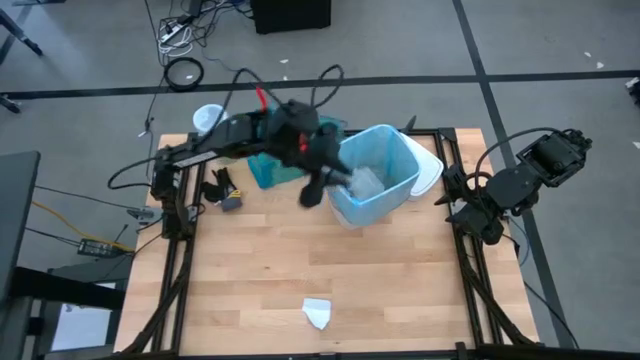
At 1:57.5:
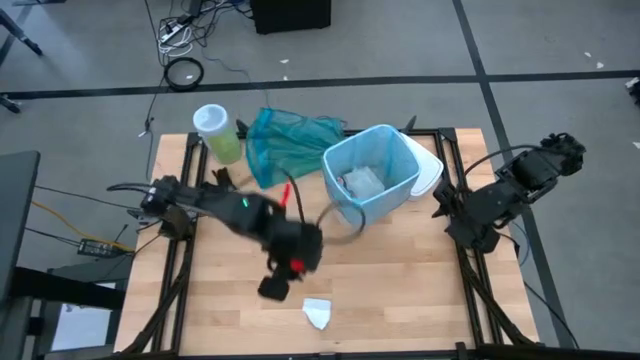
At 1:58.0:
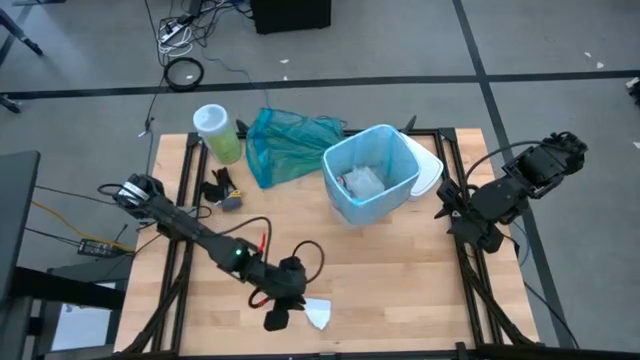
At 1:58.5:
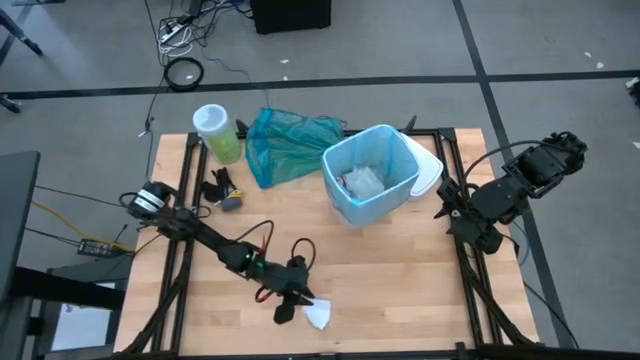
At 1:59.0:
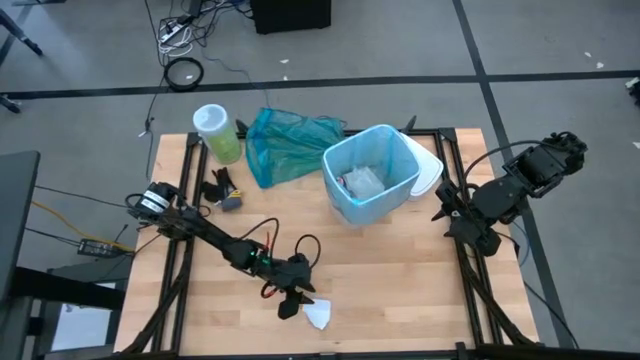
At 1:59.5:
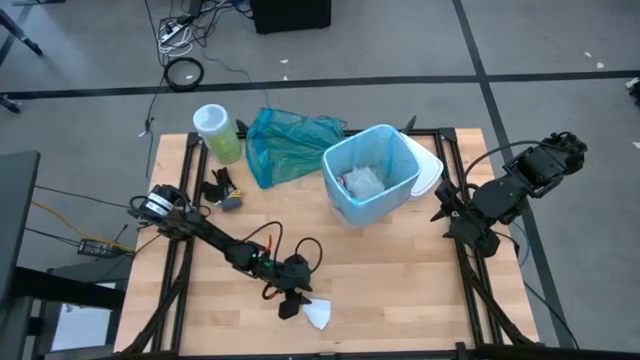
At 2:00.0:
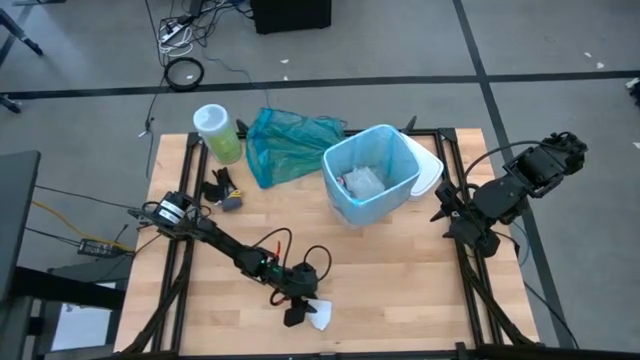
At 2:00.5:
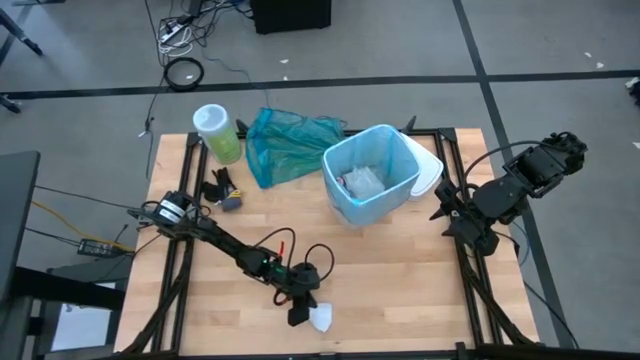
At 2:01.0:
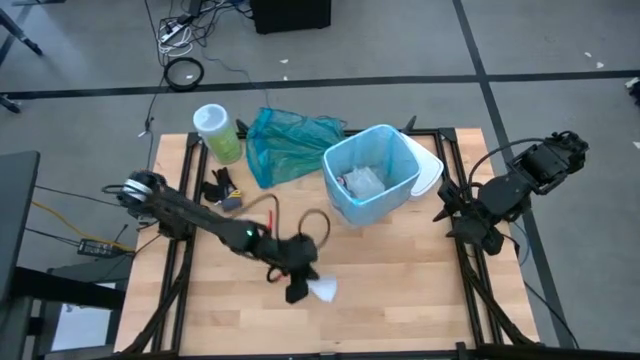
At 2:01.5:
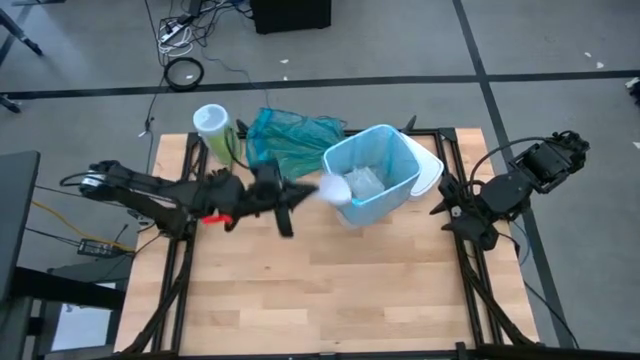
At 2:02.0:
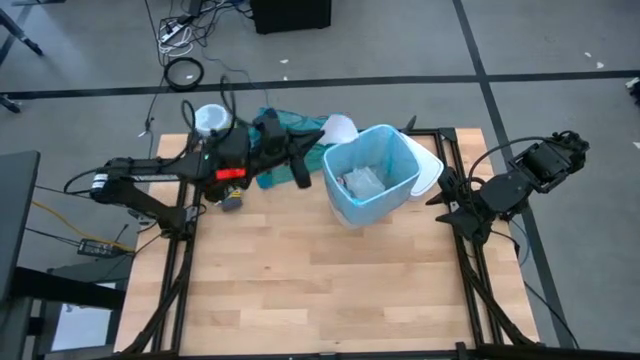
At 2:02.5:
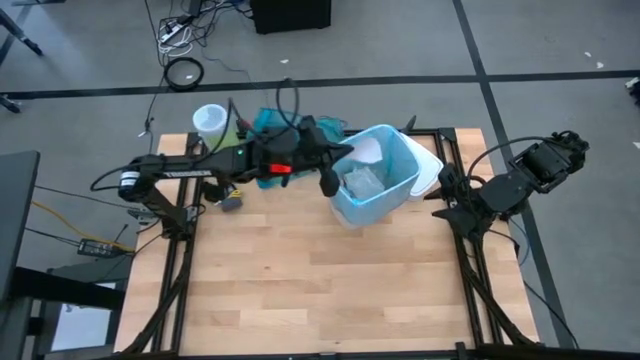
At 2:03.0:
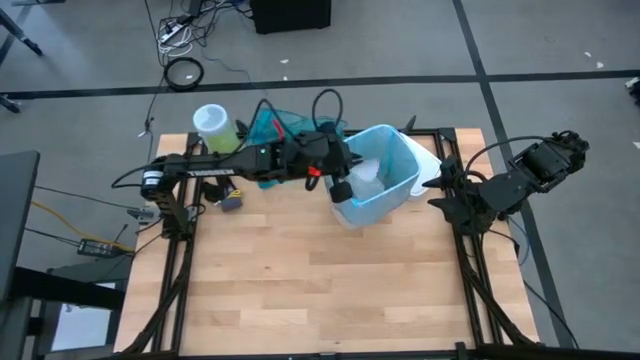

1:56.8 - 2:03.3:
Task: place trash/remove bag and relplace
Put the white paper into the white trash bin

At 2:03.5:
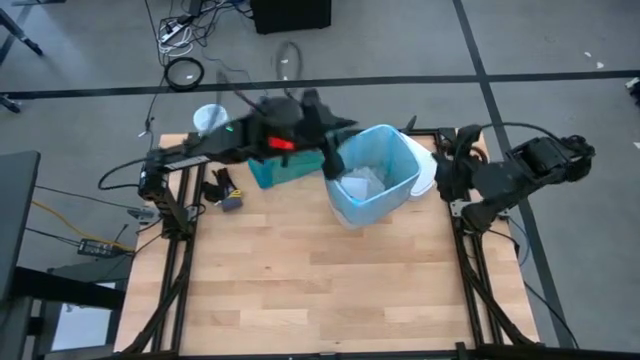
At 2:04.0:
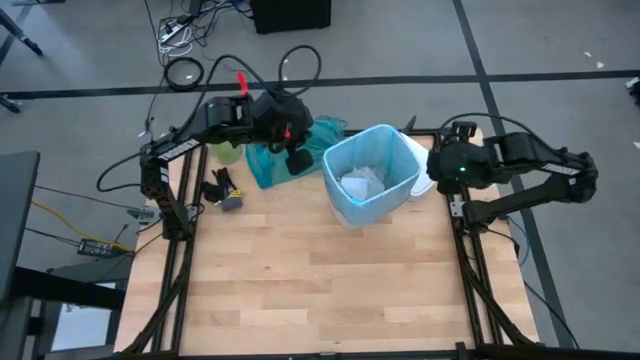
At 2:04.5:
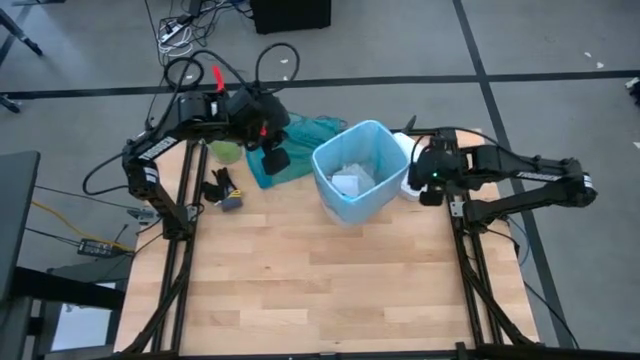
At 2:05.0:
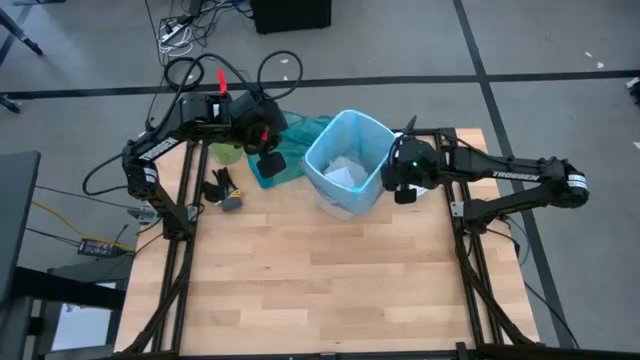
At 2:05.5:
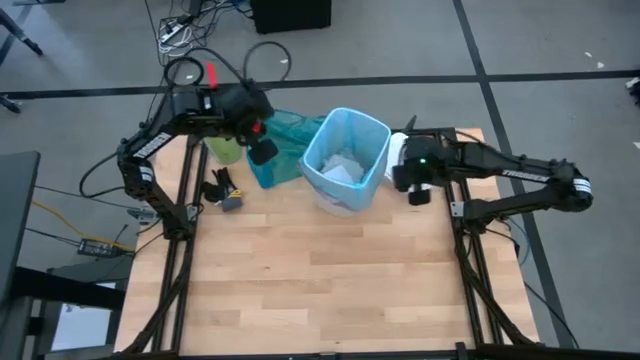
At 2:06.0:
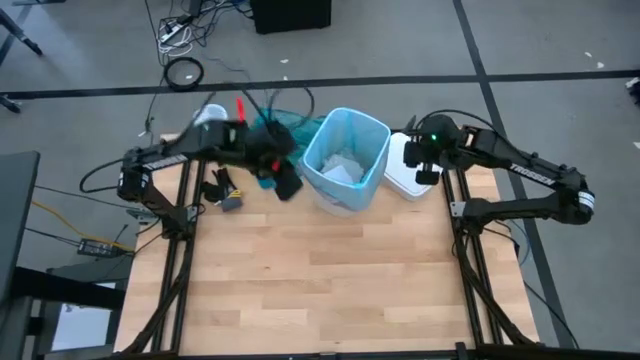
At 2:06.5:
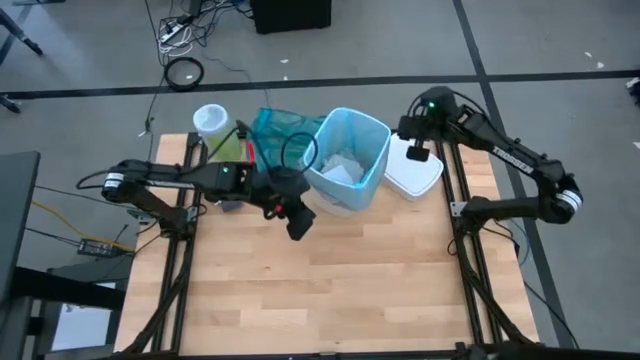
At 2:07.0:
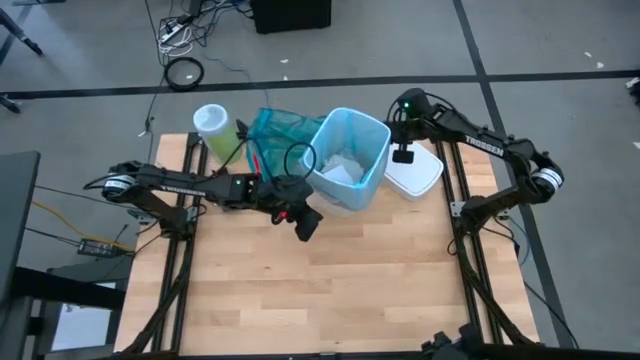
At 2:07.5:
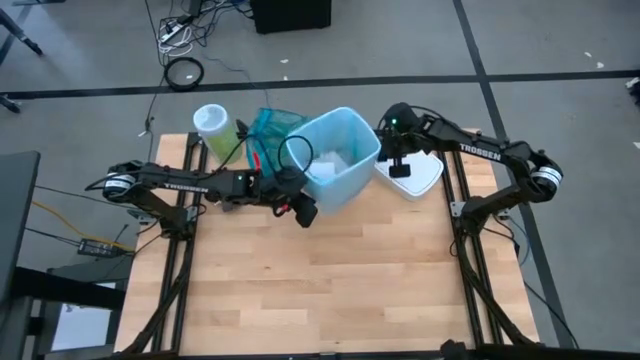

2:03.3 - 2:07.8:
Adjust the white trash bin

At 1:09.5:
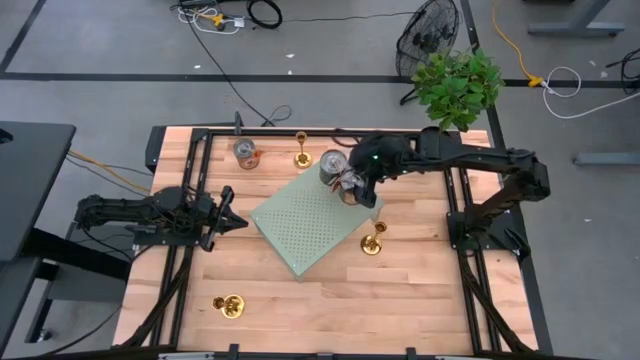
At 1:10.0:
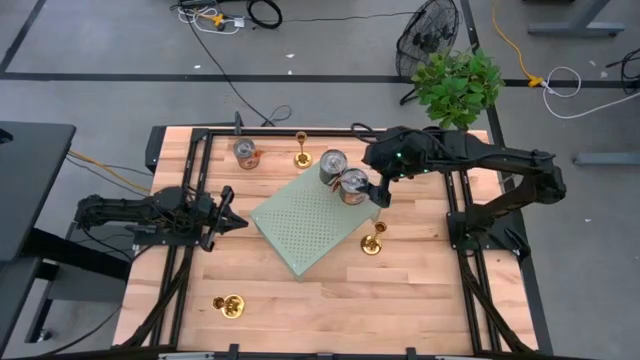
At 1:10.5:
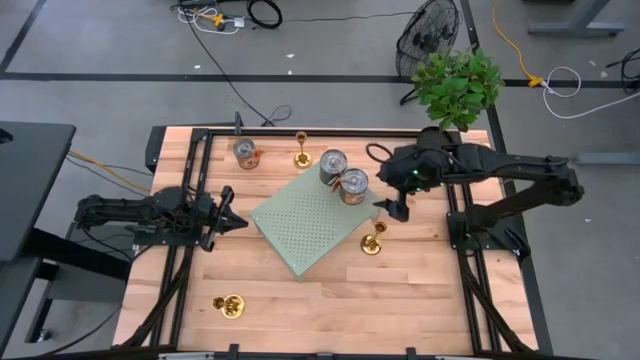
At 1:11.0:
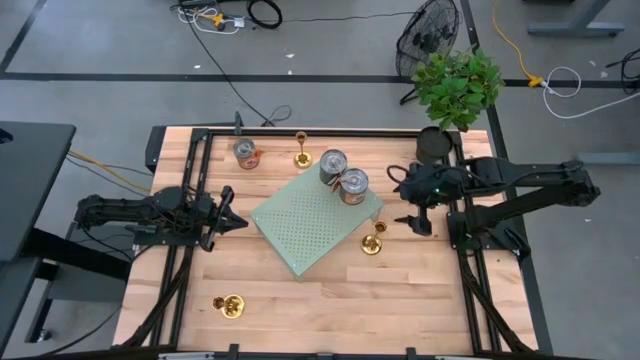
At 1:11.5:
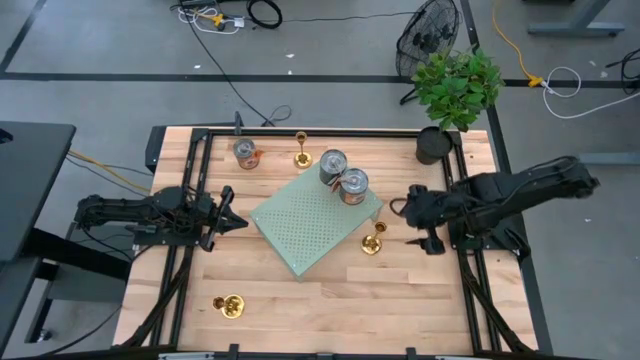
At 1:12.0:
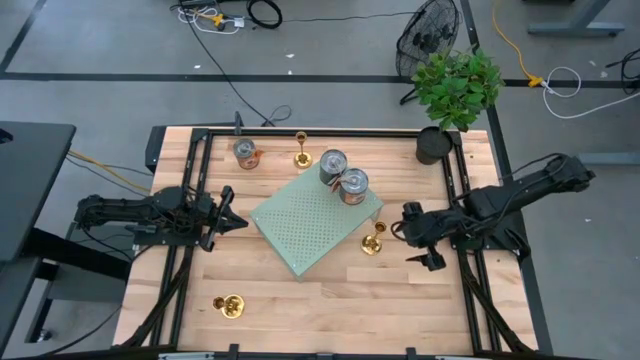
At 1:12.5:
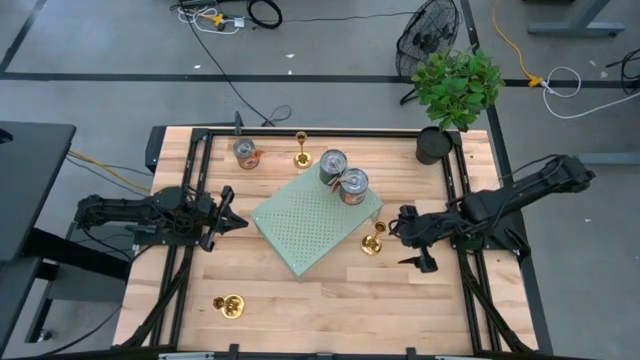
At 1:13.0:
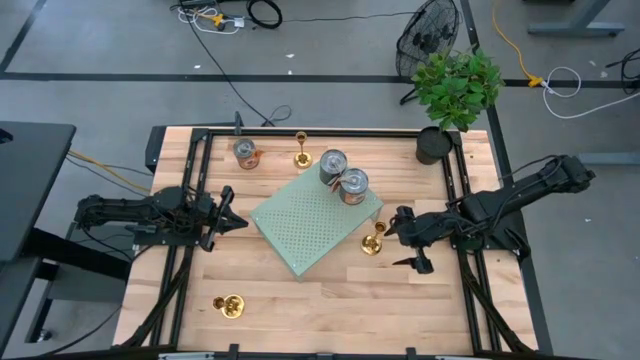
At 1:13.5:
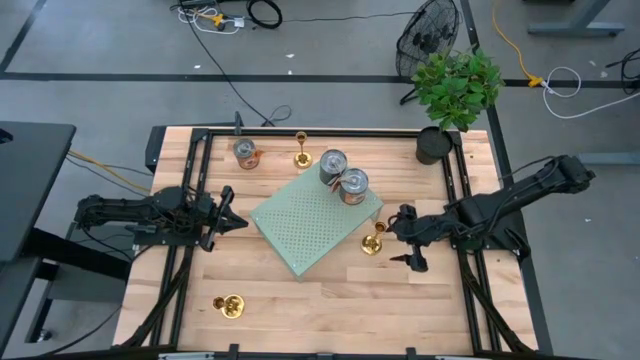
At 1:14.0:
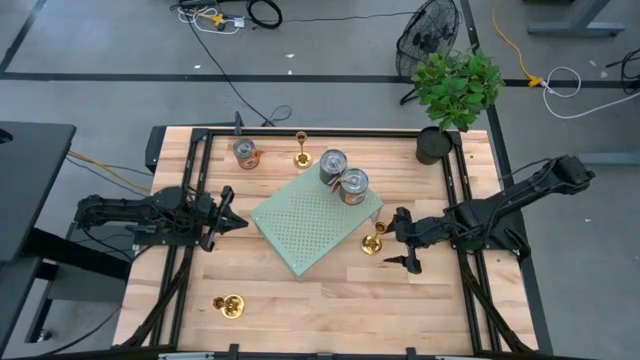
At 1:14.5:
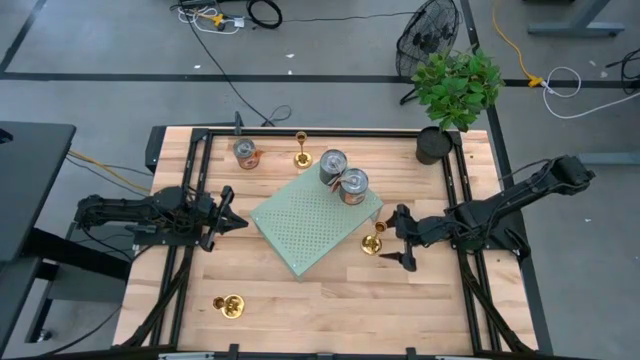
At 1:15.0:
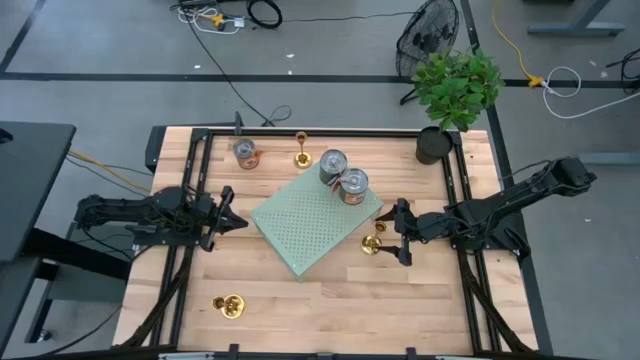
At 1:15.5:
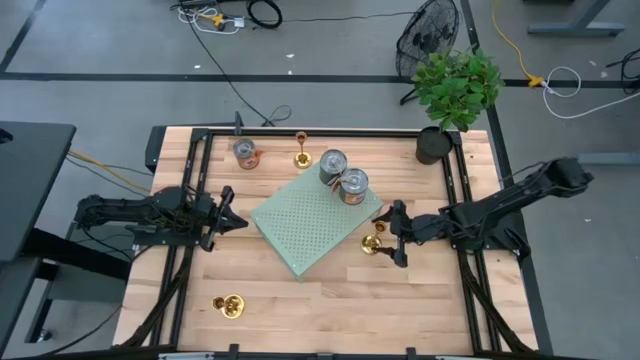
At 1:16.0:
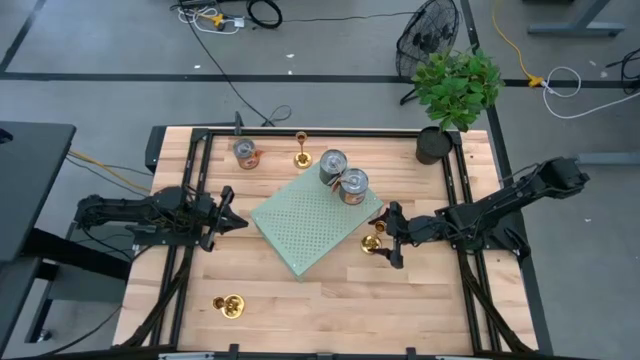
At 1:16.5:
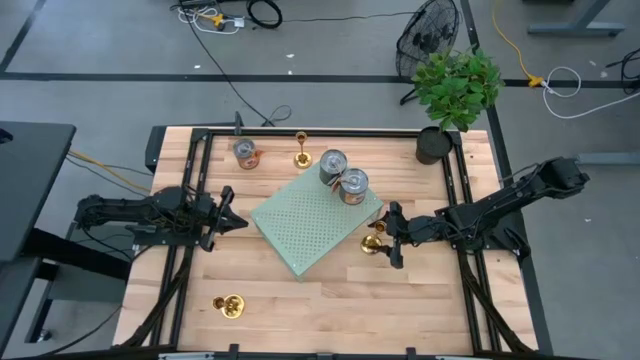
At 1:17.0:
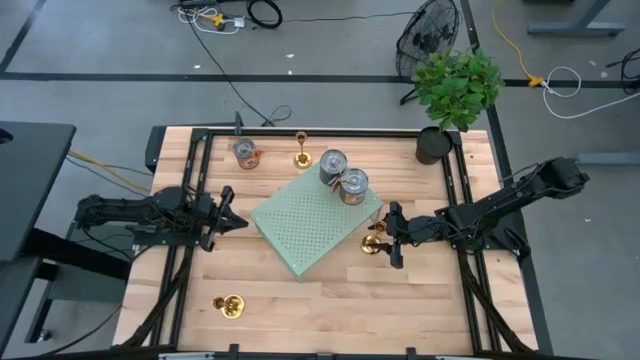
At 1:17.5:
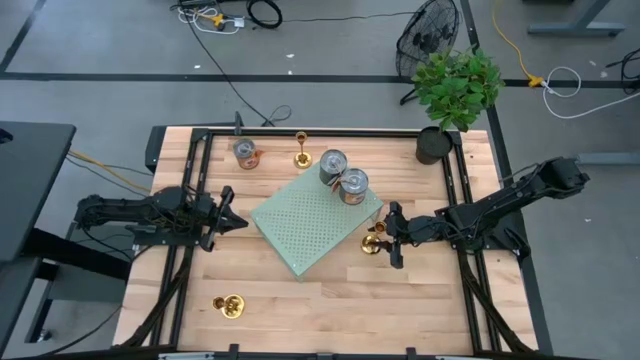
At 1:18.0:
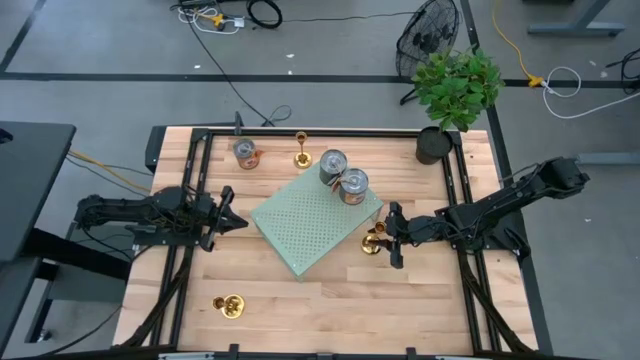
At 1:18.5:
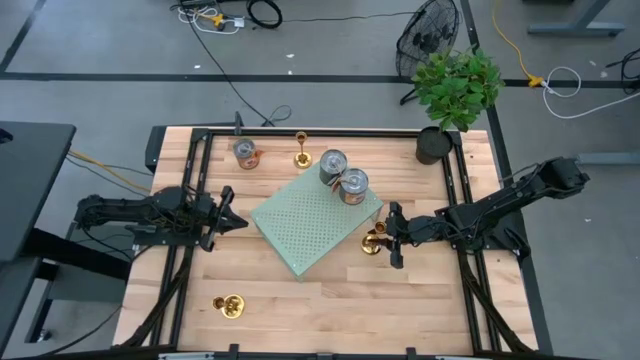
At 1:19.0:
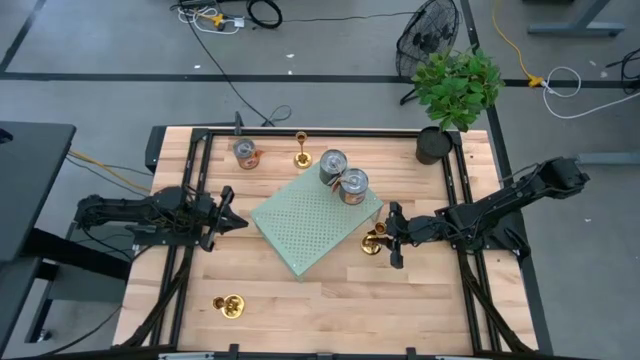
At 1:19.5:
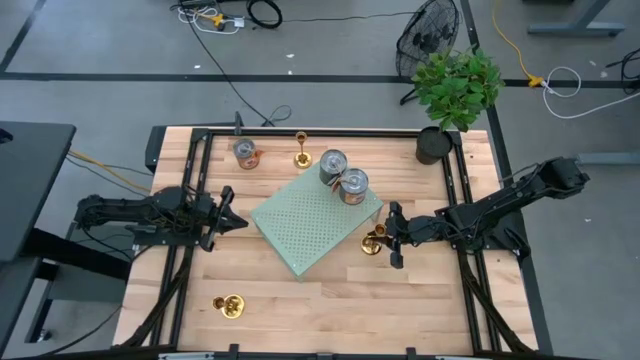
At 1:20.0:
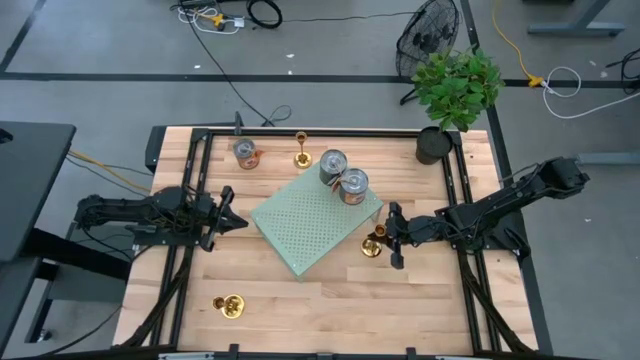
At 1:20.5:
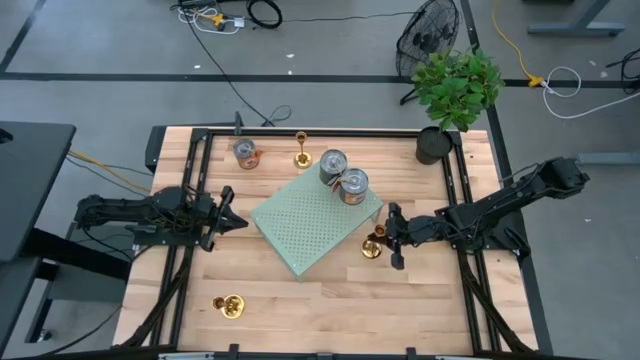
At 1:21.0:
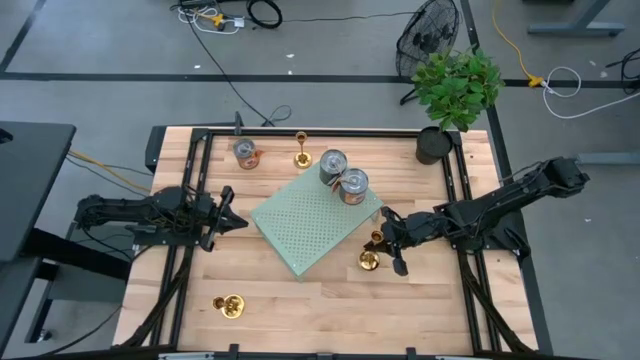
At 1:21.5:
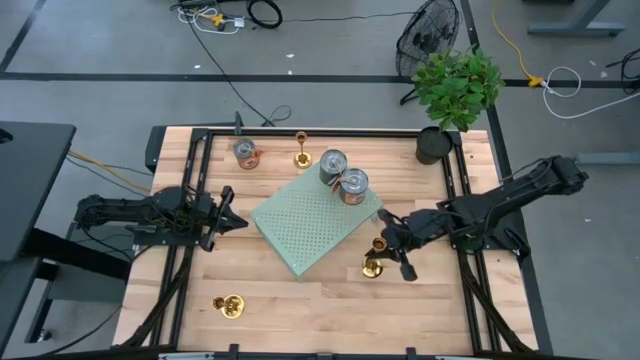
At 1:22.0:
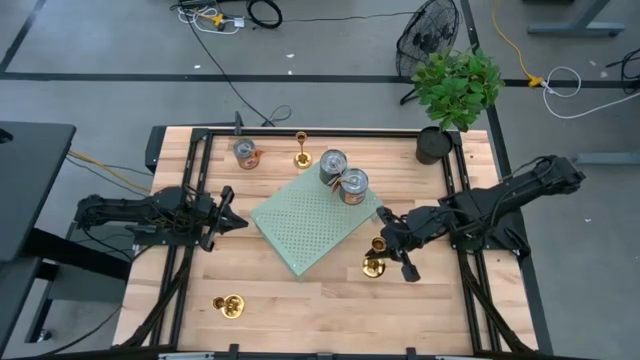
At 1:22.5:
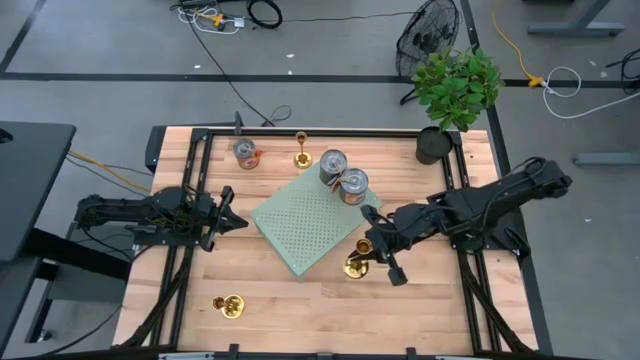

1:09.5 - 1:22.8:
Task: Pick & Place candle stick holders
Put the middle gold candle holder on the shelf
